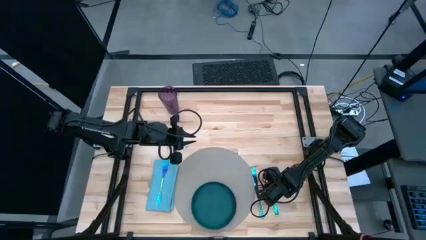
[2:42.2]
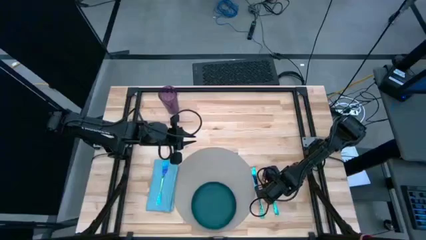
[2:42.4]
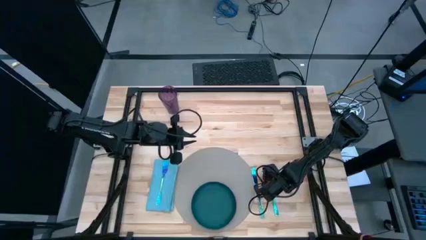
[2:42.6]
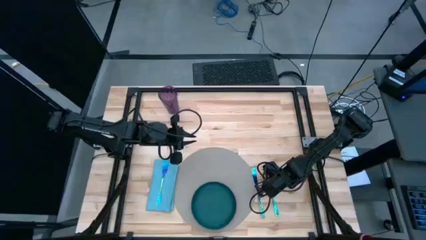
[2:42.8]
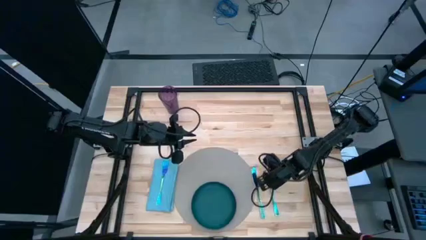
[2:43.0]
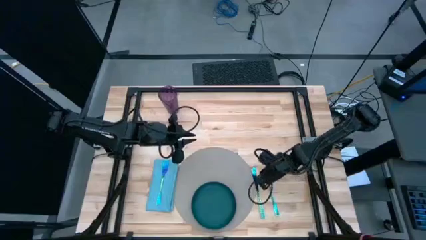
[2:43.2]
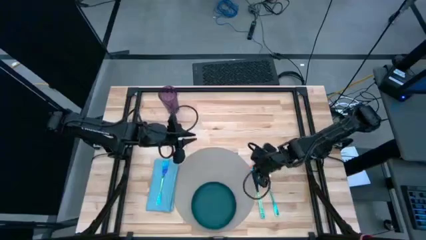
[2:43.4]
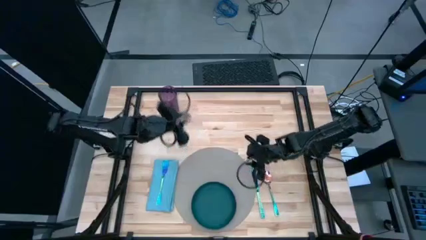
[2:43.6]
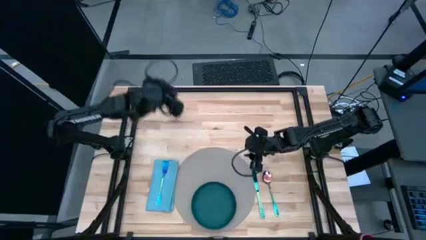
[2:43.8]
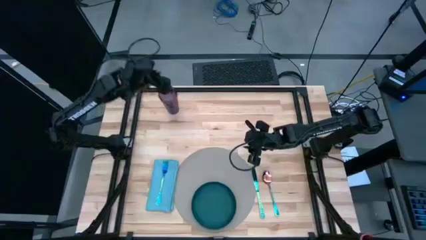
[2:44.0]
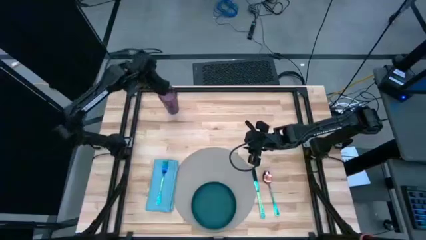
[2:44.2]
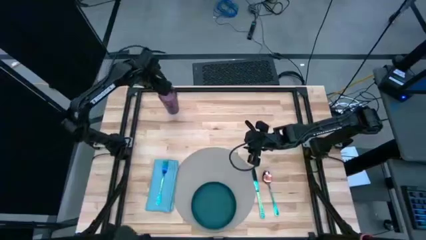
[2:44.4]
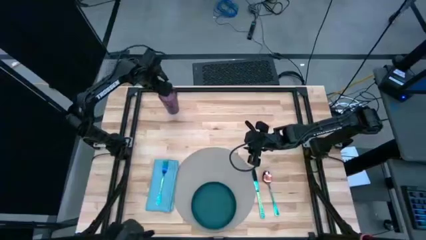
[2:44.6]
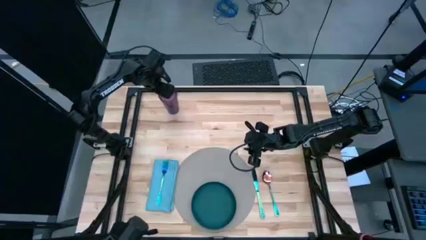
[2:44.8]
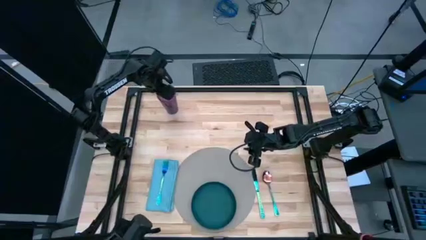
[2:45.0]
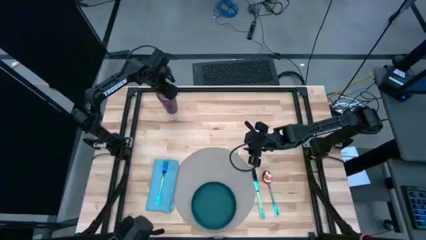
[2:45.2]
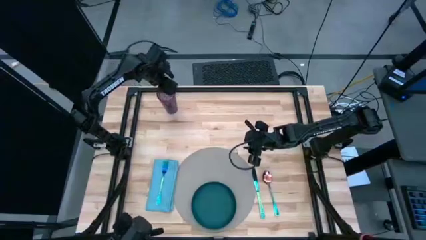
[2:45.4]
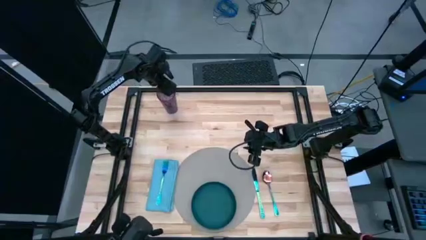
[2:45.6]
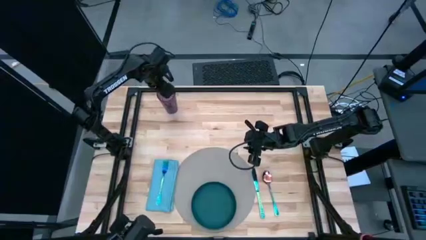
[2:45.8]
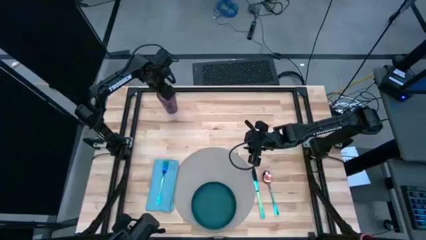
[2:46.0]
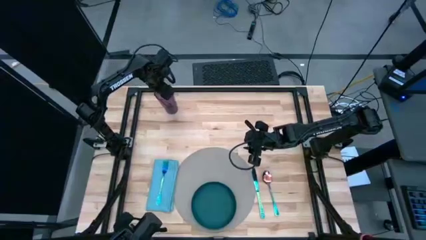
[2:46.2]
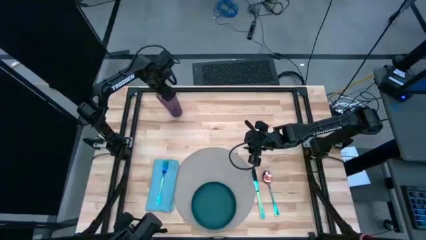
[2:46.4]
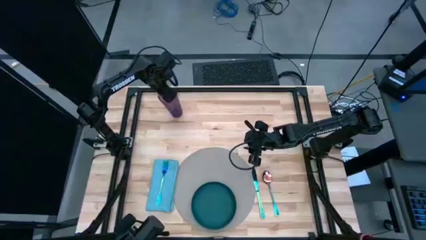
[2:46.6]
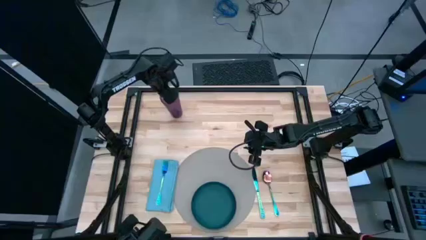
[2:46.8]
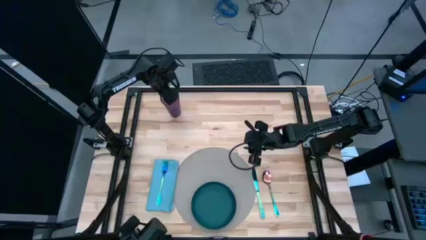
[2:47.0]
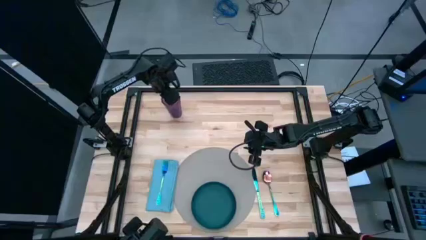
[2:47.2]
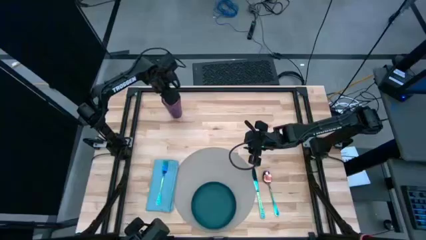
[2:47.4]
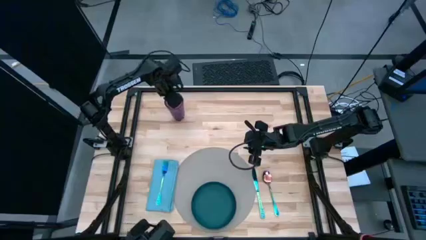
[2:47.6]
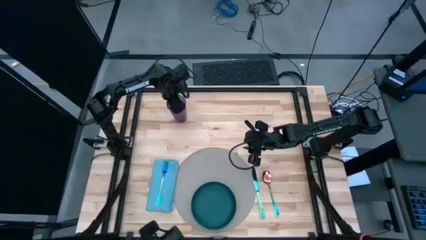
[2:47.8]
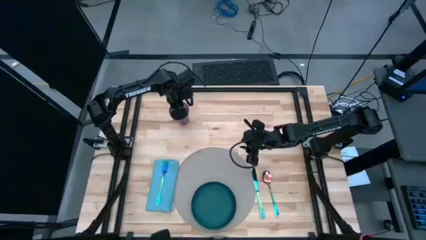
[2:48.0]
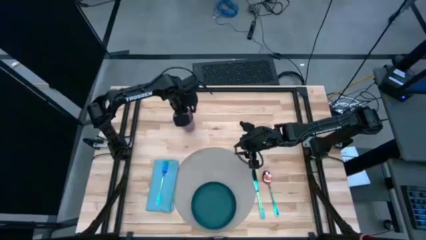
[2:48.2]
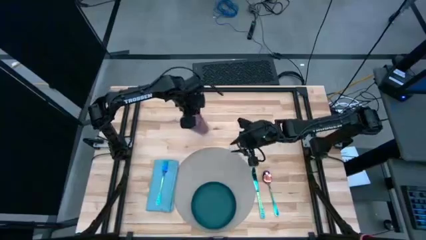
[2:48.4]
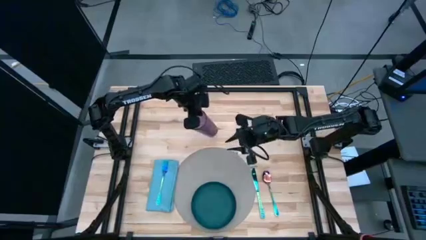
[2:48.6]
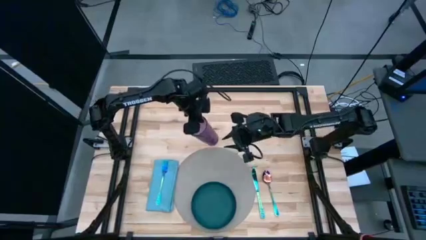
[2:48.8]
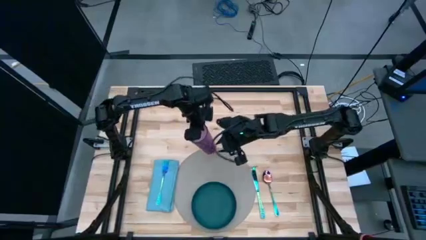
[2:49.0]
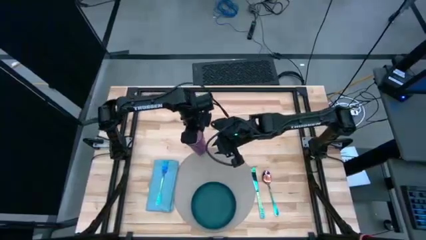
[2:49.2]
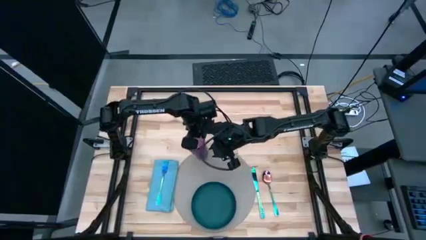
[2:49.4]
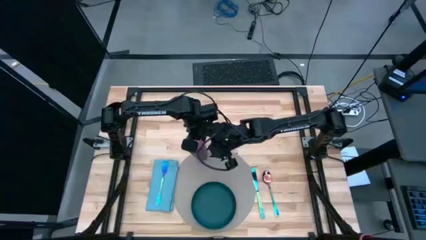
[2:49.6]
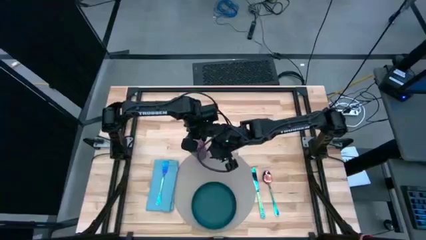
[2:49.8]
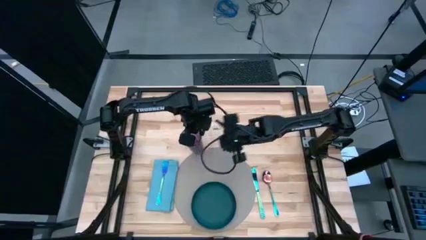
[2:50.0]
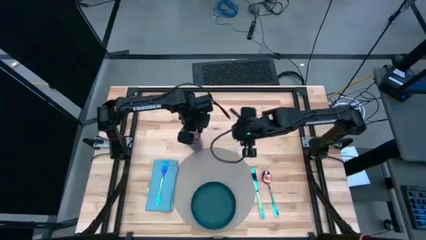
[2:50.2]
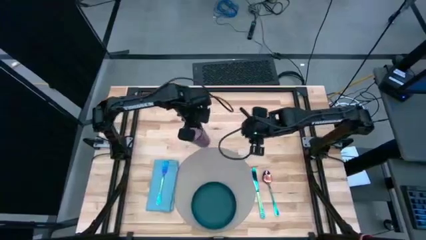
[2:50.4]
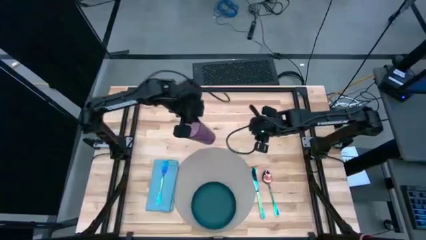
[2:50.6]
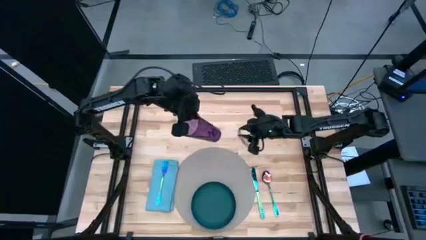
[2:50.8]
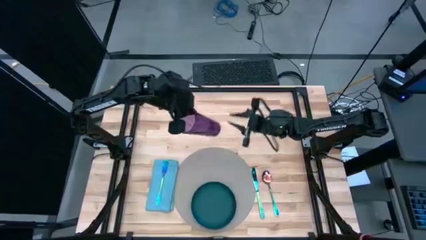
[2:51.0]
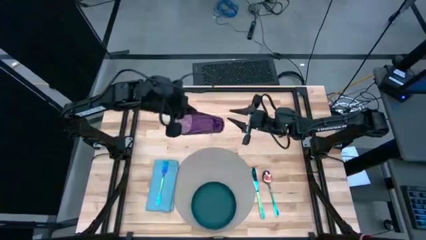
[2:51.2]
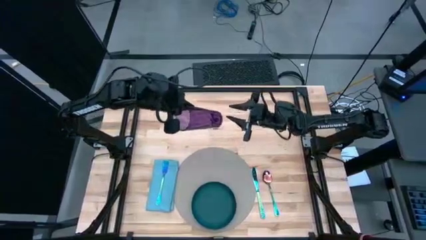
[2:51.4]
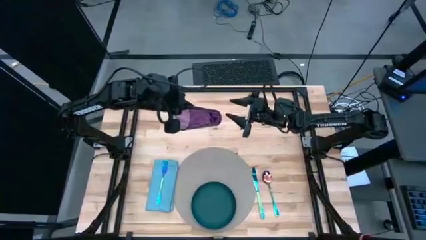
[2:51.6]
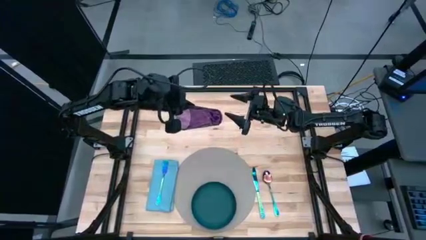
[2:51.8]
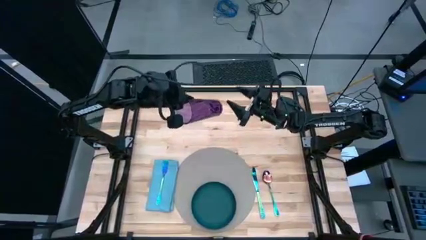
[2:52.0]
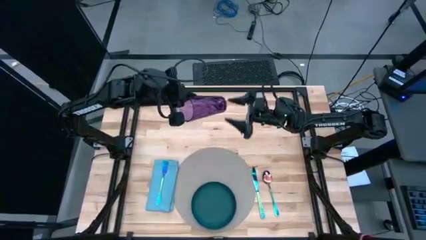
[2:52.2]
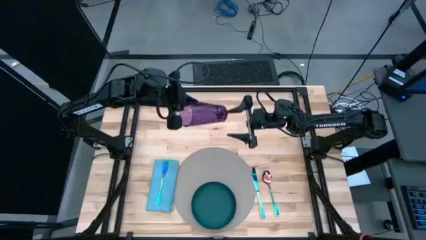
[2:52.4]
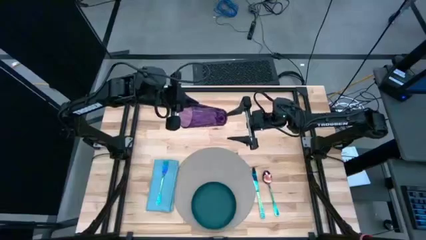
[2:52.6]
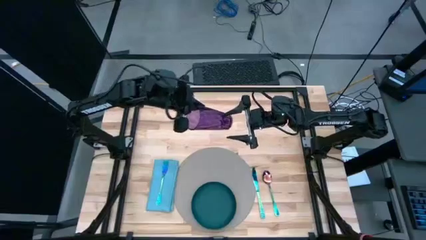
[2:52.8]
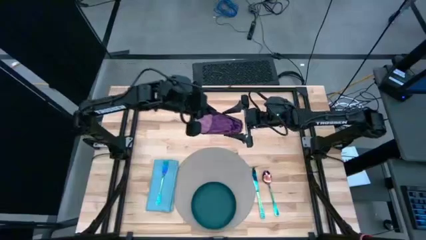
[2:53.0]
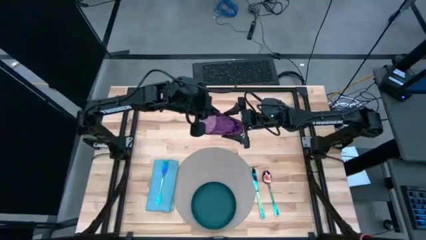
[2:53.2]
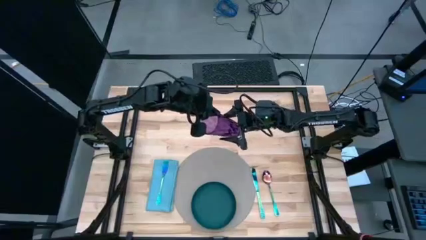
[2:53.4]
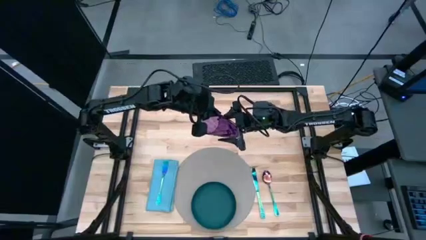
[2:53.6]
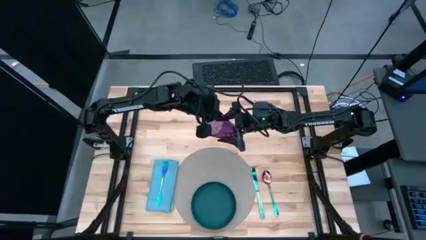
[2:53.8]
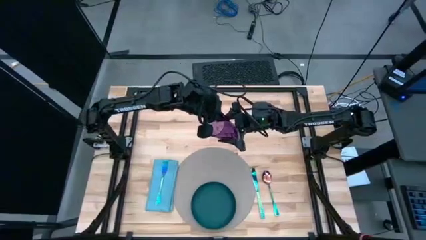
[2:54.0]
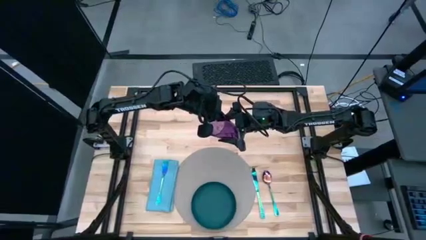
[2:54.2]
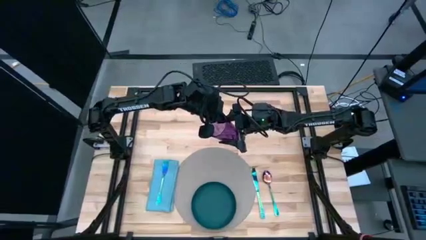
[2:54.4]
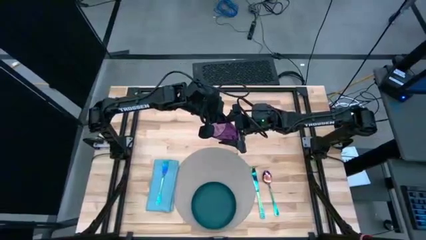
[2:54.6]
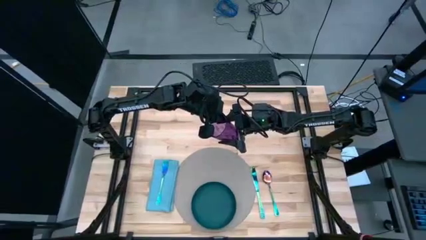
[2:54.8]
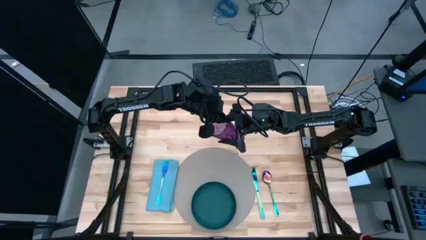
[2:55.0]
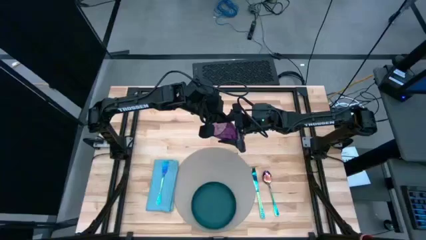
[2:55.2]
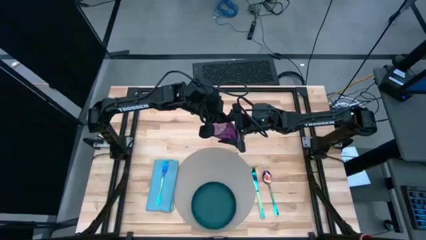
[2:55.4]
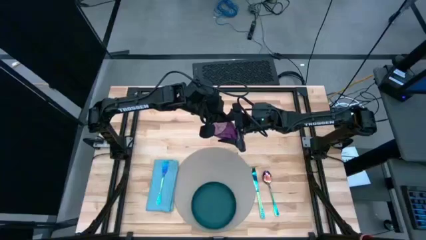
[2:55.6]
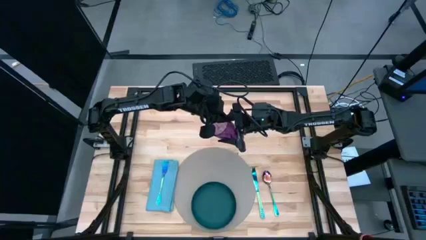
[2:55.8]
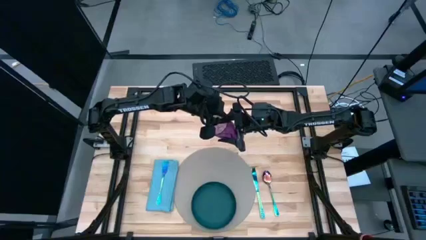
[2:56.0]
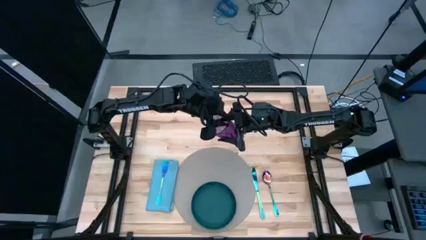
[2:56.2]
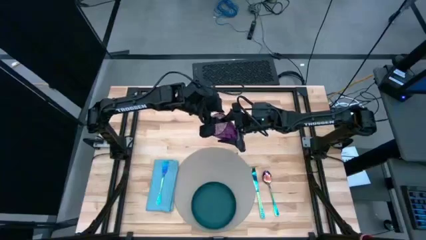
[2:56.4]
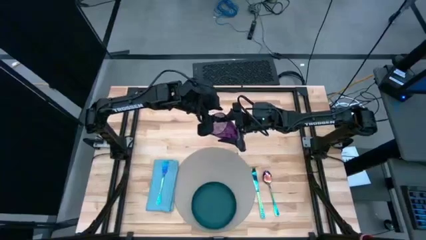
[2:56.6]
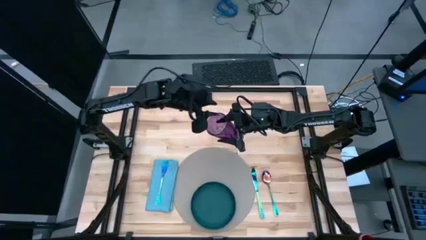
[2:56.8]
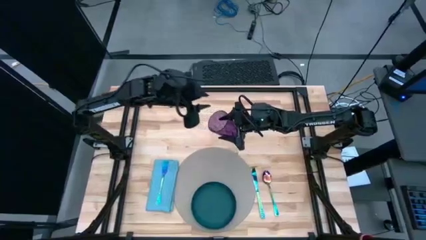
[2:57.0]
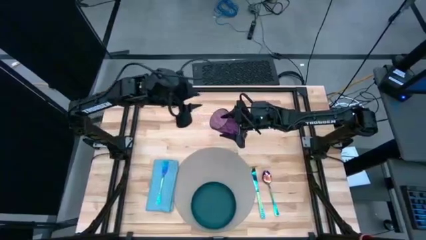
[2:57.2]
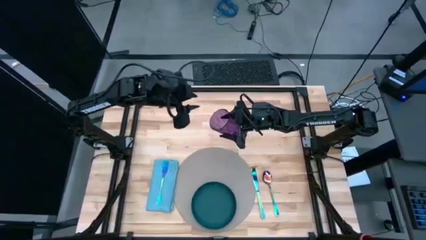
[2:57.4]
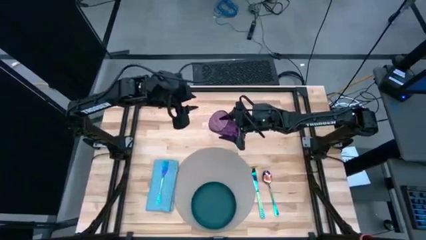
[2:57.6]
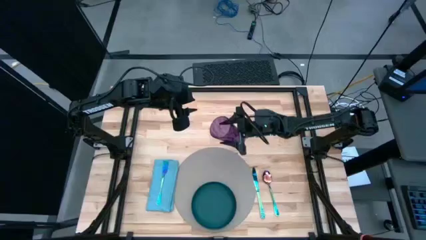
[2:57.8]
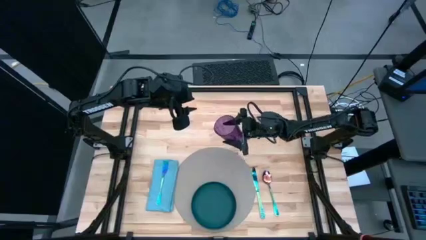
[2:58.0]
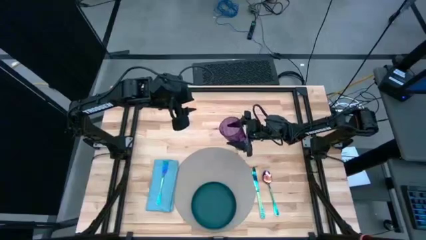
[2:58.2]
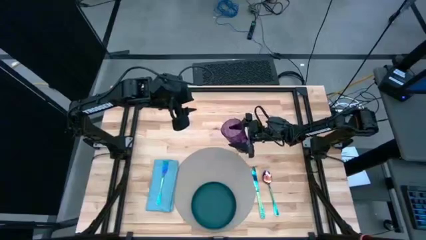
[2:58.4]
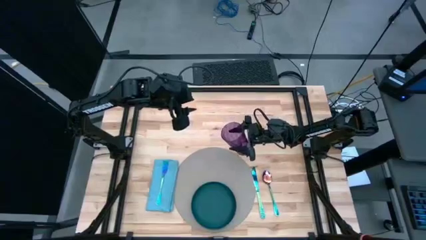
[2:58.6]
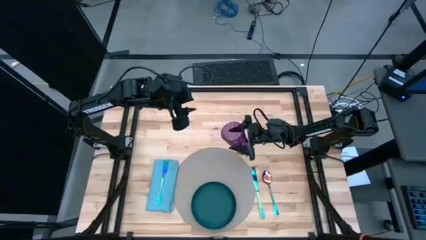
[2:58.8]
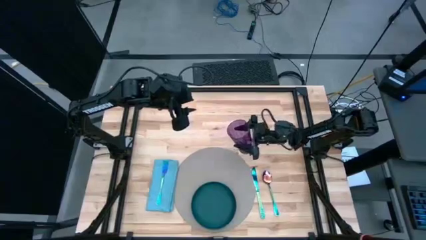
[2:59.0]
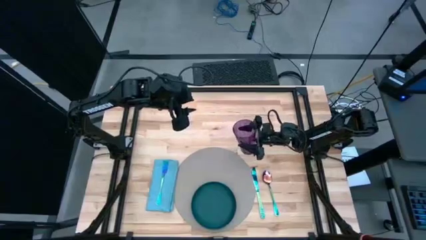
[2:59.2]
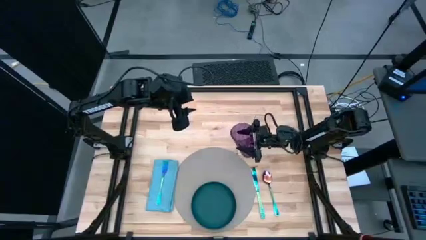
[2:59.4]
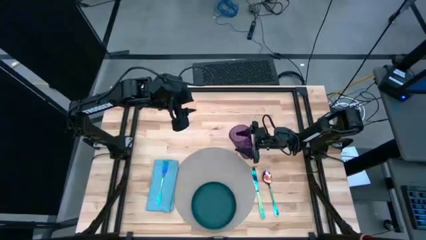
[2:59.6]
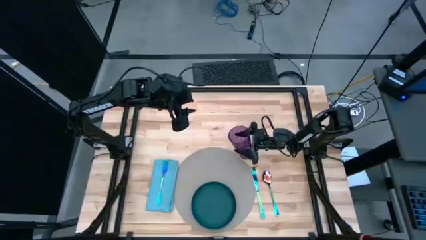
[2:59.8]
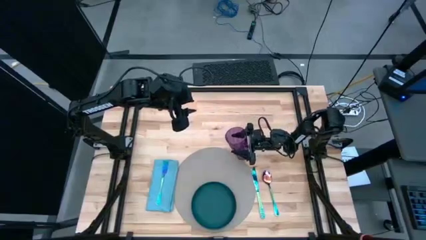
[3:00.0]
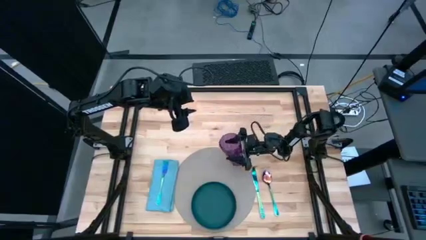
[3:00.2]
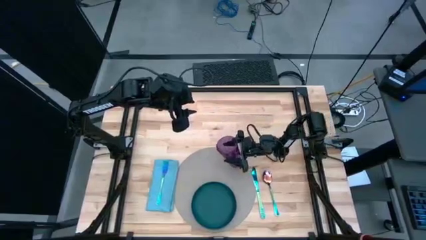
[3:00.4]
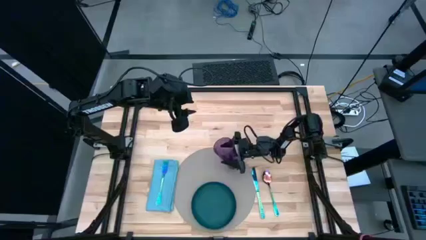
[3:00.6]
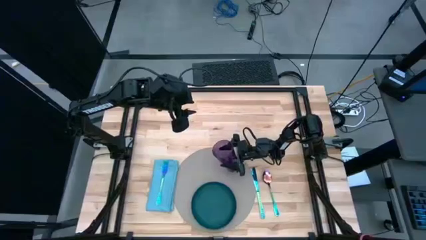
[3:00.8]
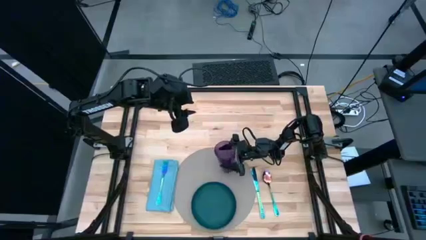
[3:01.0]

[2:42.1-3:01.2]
Task: Set table place
Put the purple glass on the gray placemat to the top of the green plate
